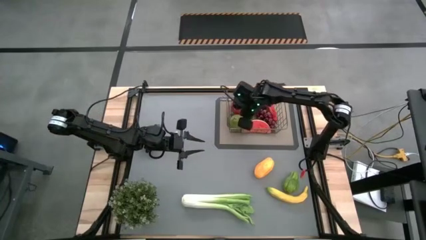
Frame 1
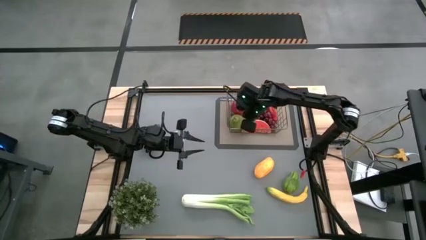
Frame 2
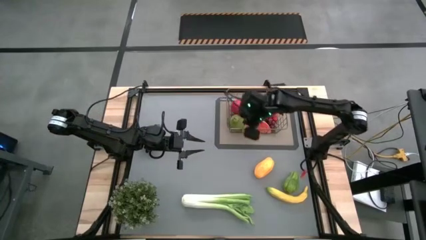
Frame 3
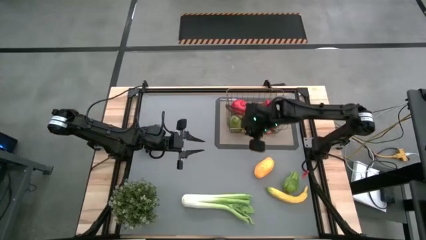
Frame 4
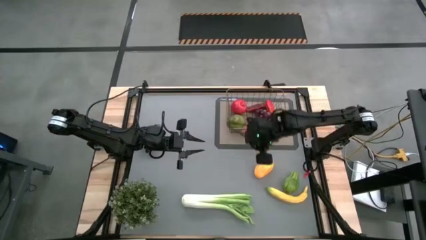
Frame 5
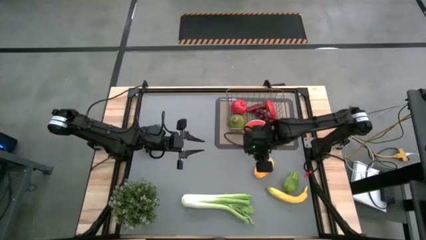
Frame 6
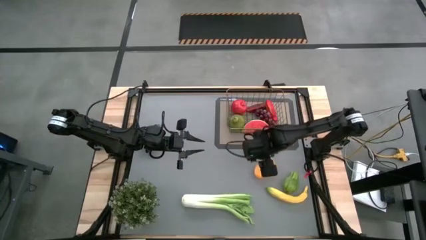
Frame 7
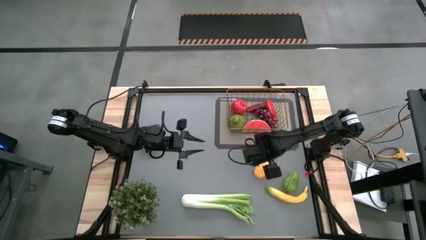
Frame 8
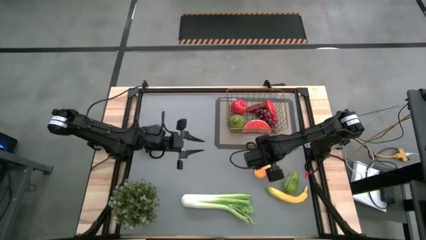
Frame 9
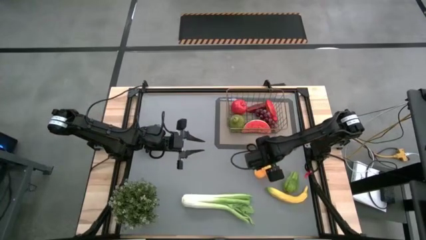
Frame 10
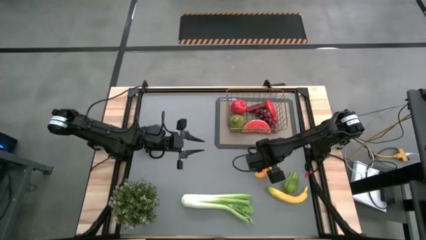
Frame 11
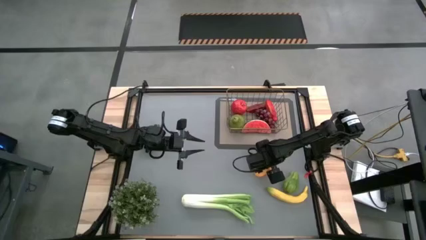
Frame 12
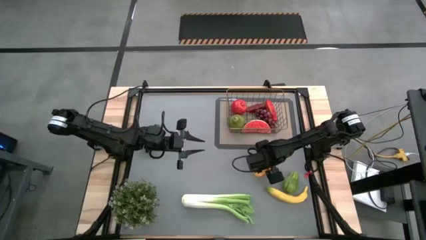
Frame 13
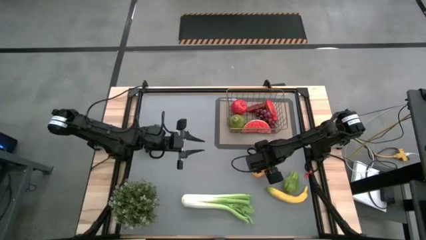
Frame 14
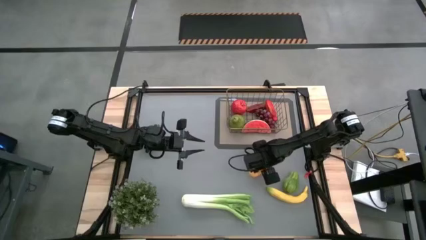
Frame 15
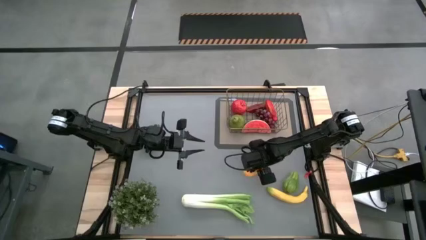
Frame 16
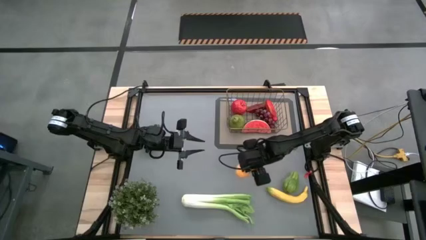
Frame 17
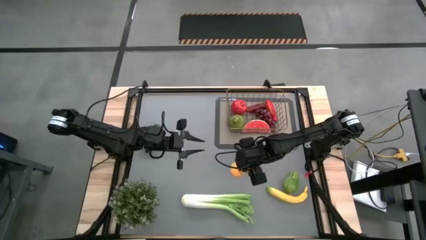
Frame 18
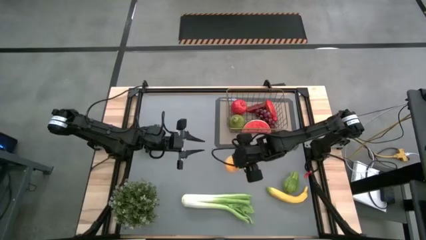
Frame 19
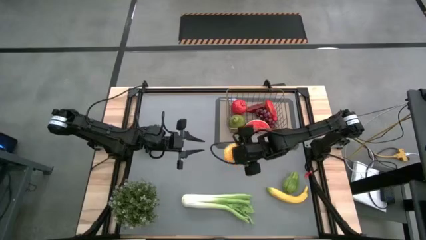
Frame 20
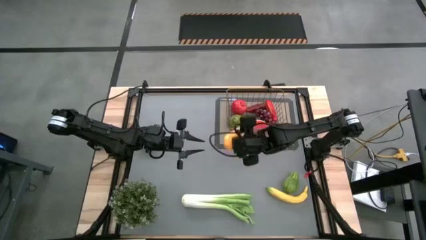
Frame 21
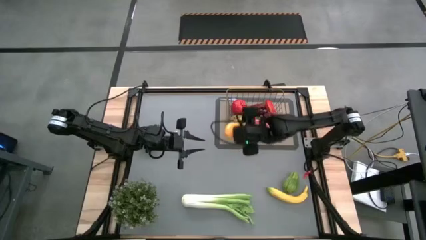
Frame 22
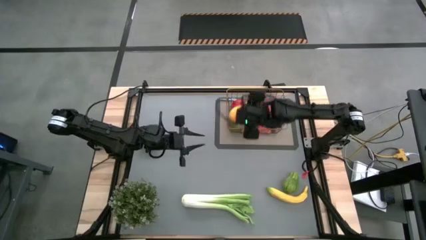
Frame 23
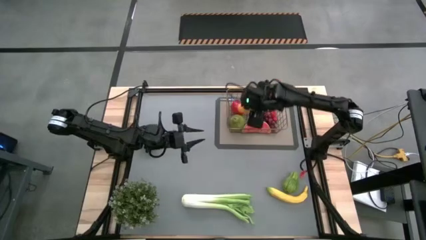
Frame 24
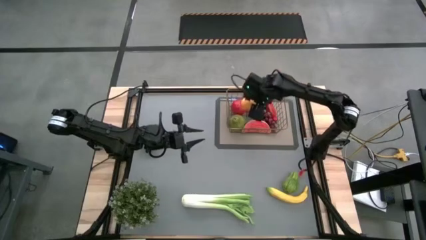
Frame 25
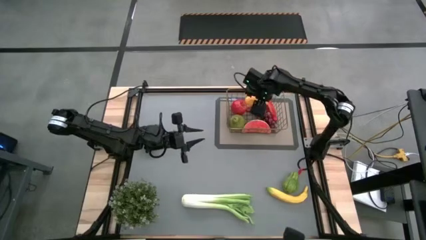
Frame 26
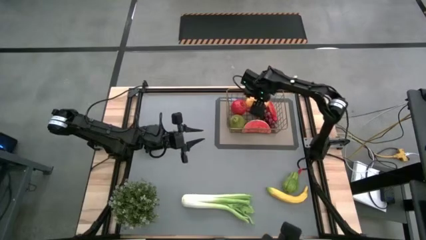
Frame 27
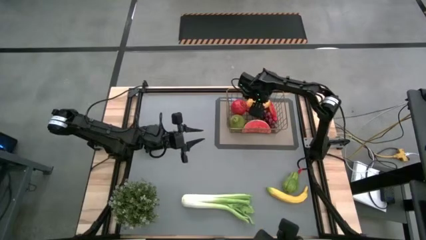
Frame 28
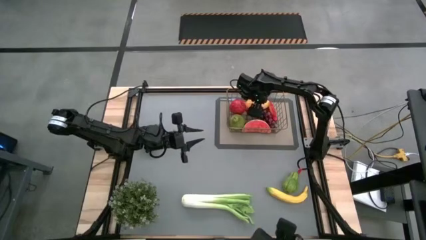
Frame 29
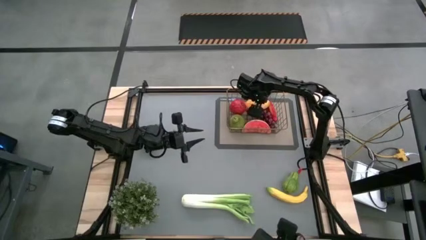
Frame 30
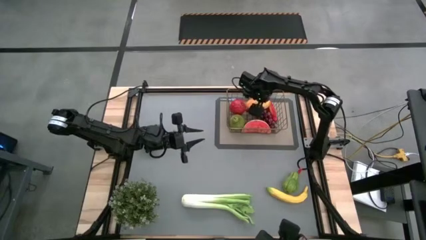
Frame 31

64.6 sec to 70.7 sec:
Task: Build produce basket
Put the mango into the wire basket

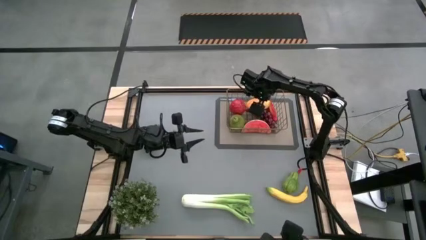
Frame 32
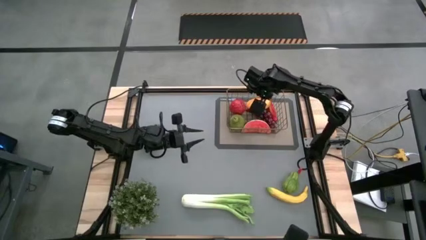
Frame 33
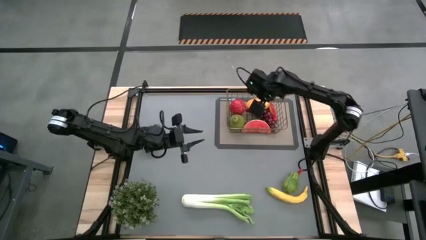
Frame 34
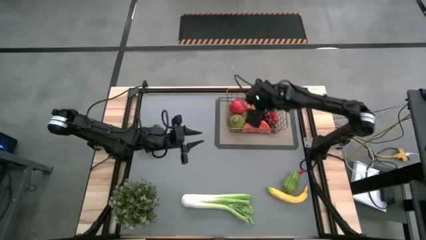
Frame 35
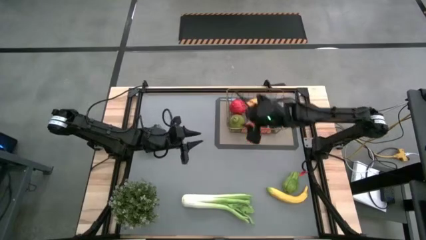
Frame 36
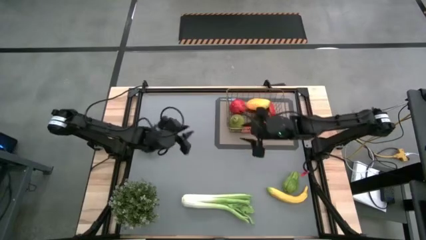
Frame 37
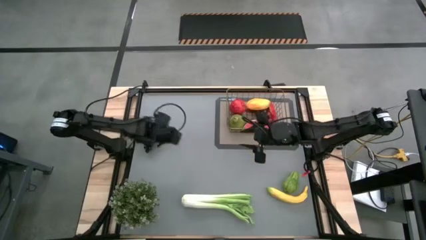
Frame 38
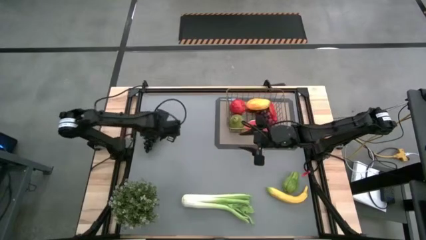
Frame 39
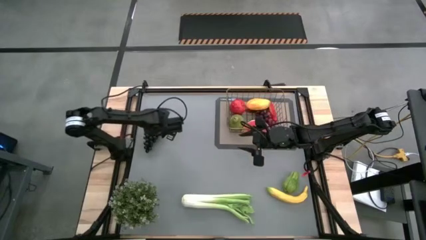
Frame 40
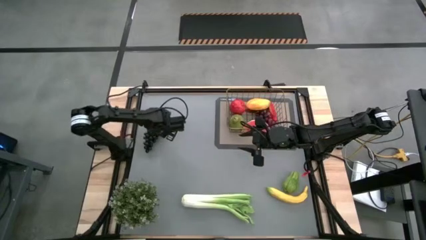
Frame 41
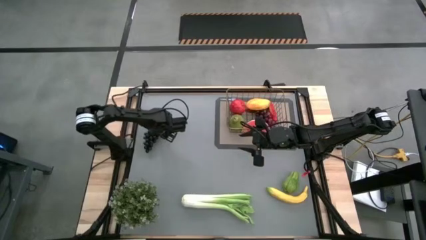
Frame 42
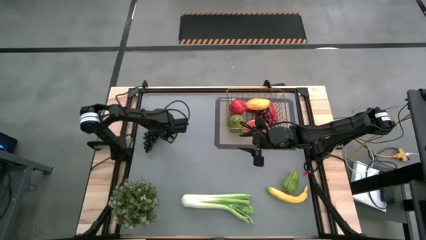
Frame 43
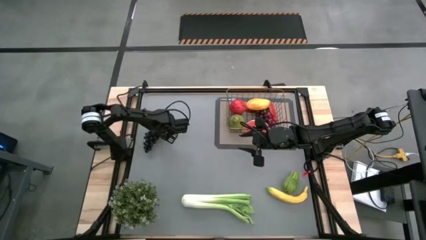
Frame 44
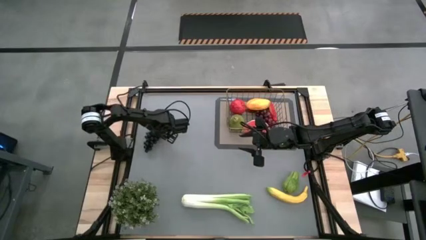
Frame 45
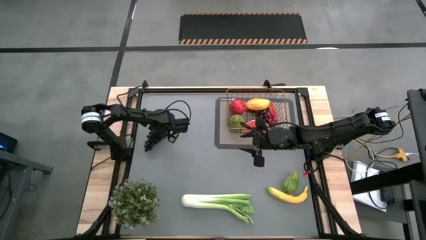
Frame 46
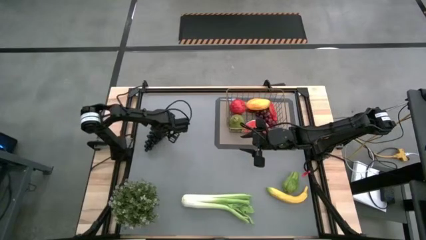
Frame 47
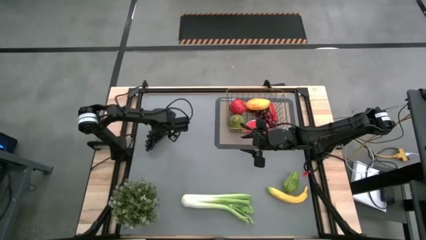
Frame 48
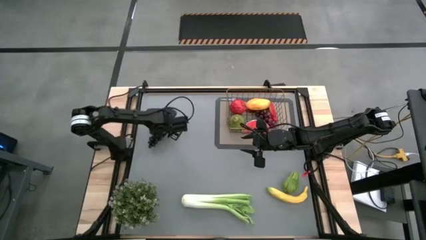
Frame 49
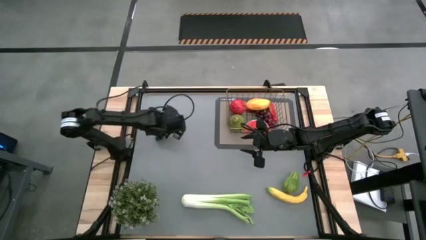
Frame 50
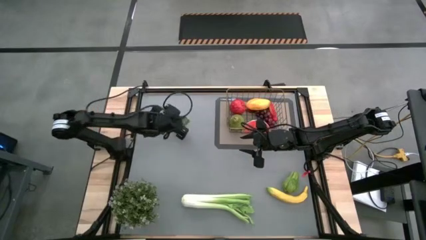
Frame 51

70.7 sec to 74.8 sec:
Put the black grapes into the wire basket

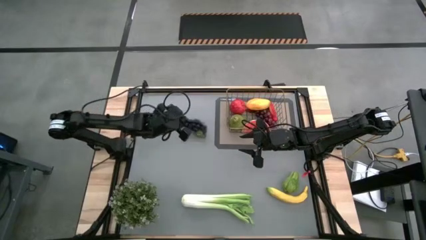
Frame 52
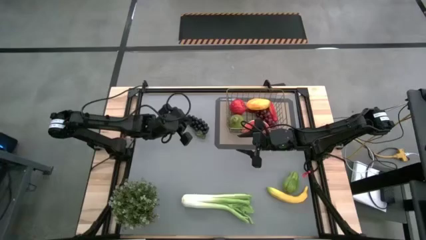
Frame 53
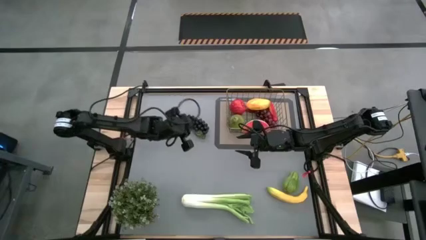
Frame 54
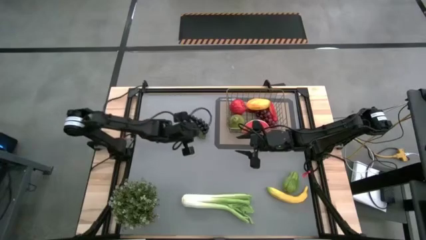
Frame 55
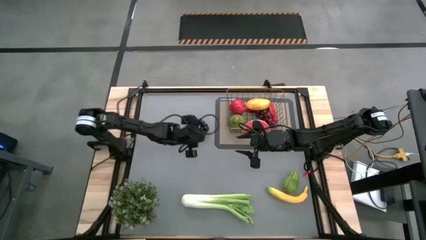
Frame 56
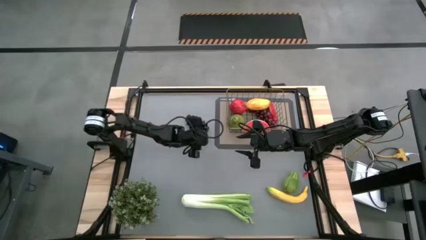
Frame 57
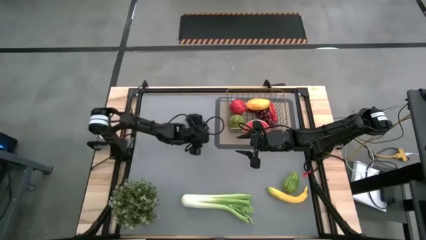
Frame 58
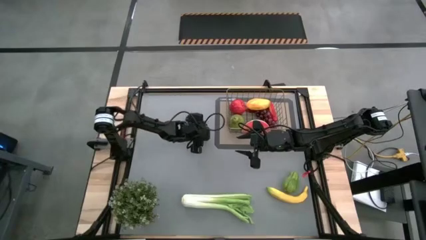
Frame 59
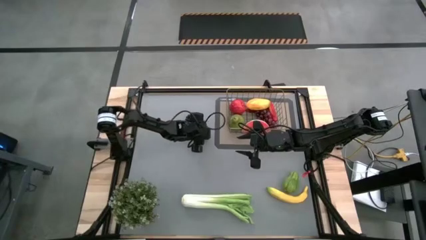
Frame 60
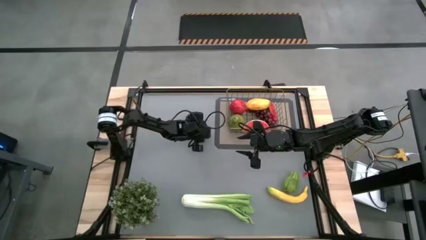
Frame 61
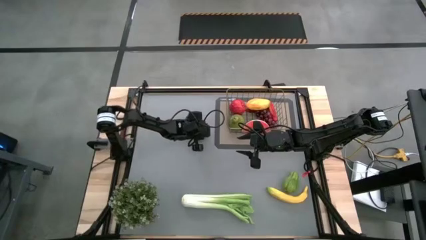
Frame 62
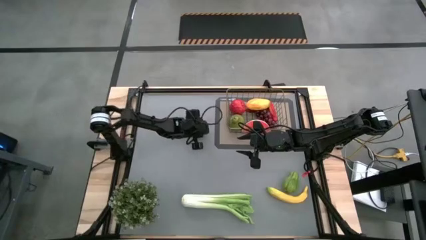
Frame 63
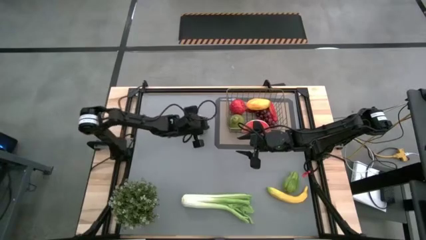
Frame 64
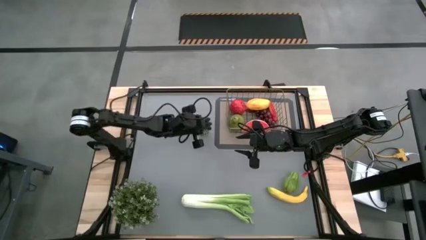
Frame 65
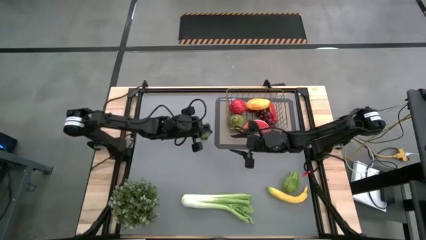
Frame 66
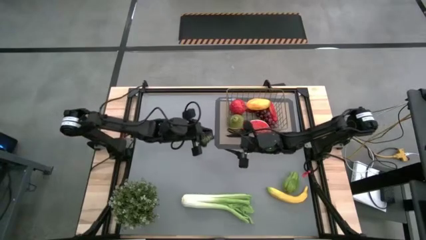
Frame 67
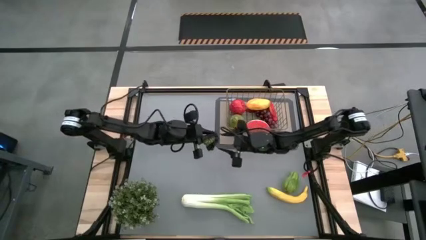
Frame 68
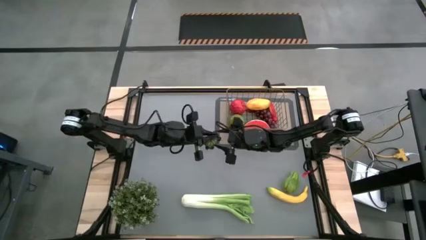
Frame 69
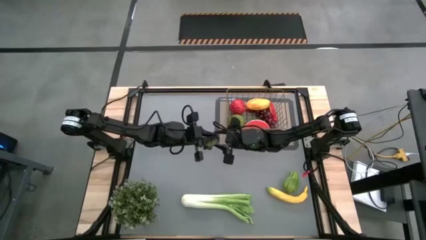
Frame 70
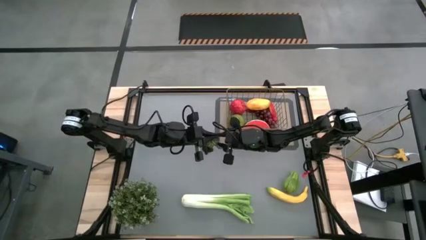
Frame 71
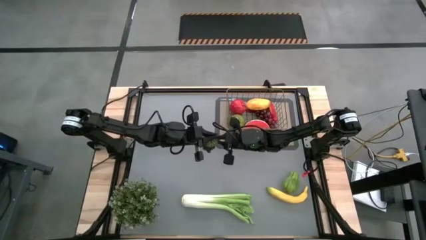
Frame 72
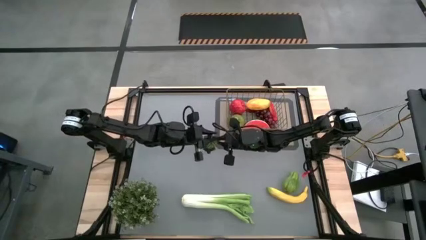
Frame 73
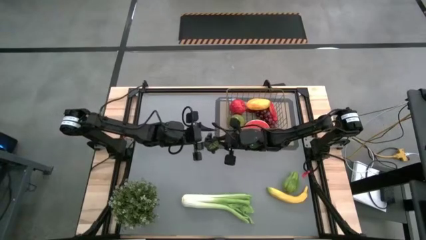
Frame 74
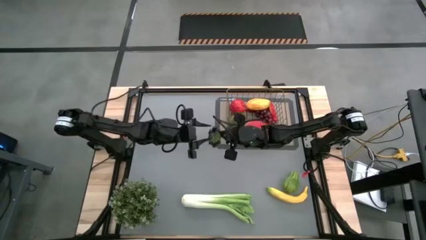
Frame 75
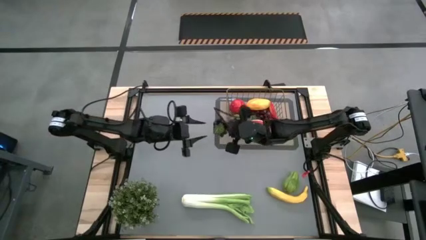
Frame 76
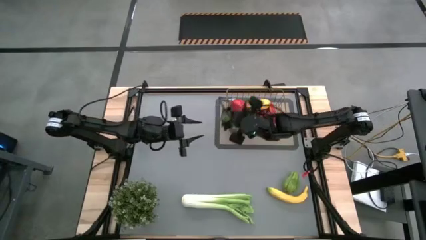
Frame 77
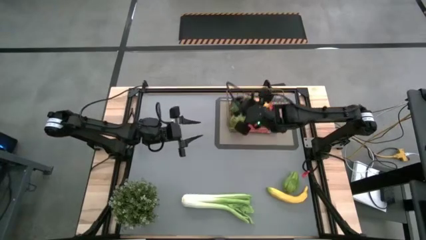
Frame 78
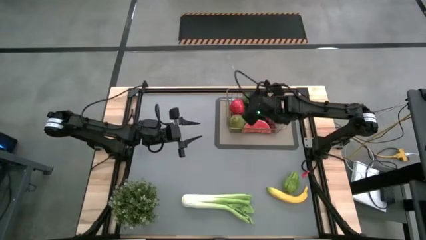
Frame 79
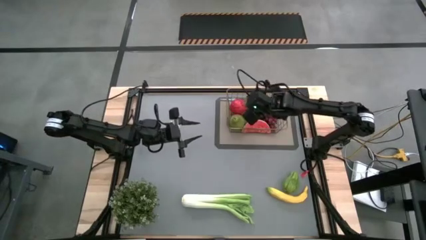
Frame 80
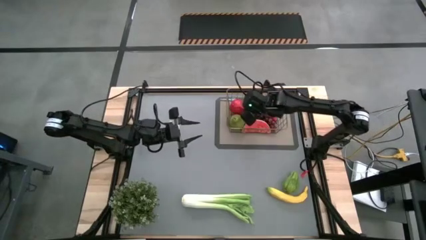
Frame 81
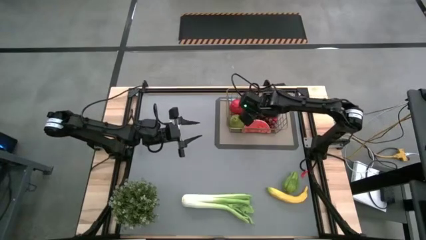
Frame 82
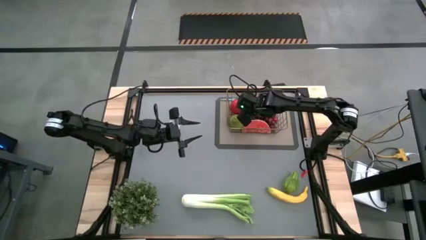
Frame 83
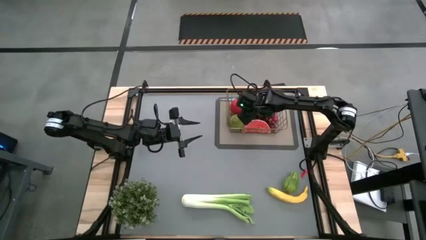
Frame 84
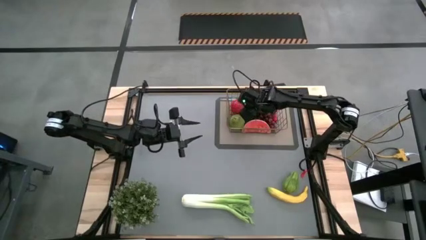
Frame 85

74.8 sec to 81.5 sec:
Put the black grape into the wire basket
